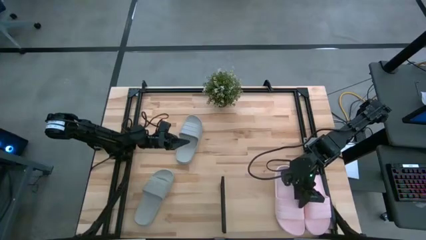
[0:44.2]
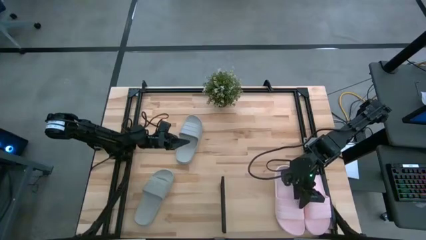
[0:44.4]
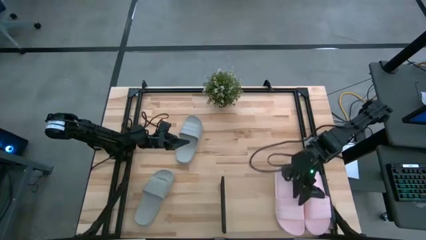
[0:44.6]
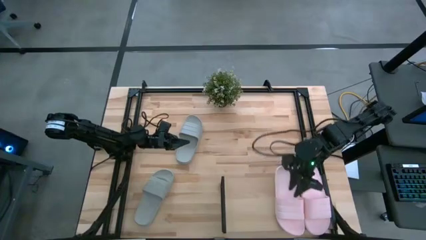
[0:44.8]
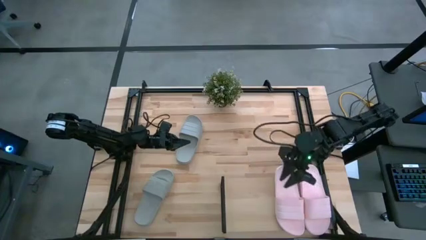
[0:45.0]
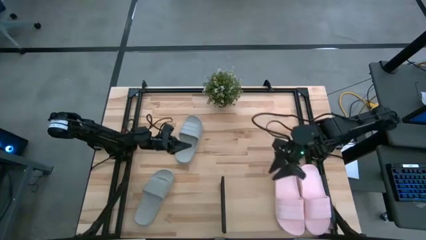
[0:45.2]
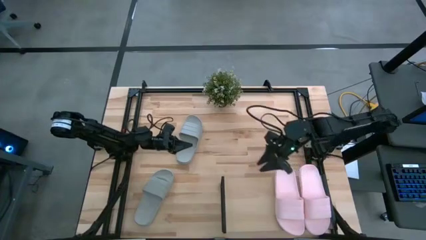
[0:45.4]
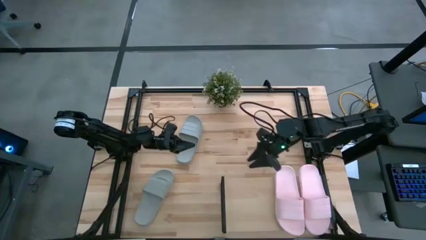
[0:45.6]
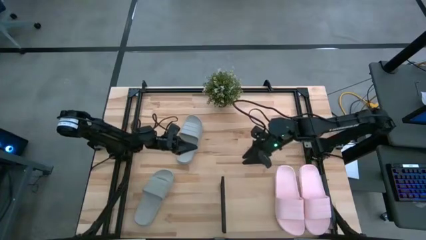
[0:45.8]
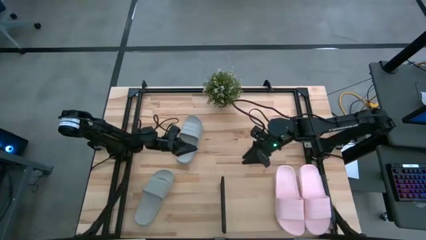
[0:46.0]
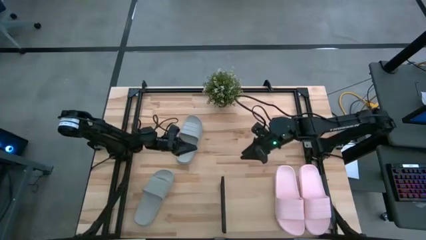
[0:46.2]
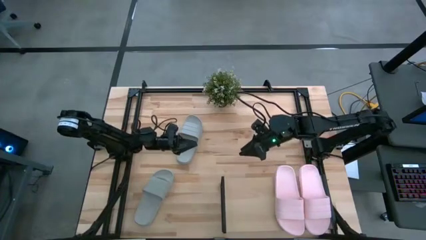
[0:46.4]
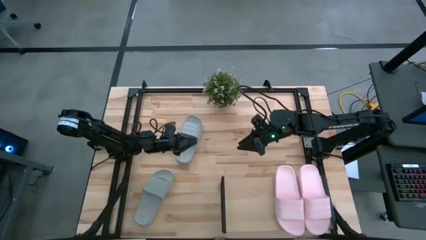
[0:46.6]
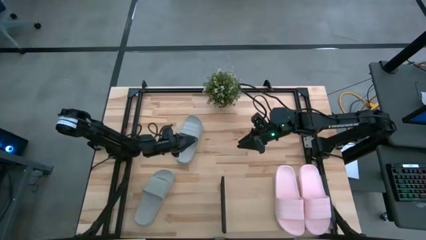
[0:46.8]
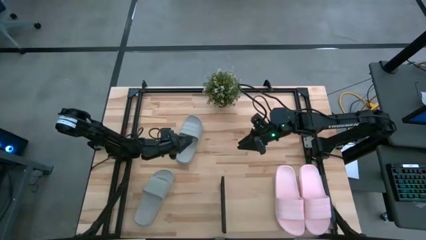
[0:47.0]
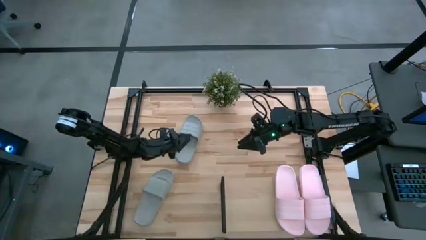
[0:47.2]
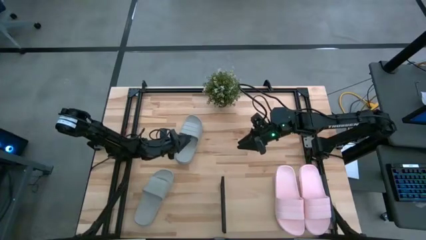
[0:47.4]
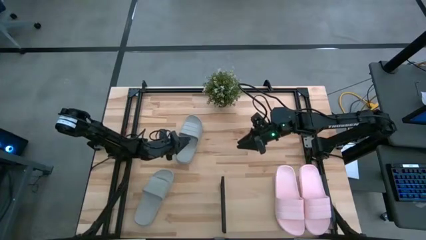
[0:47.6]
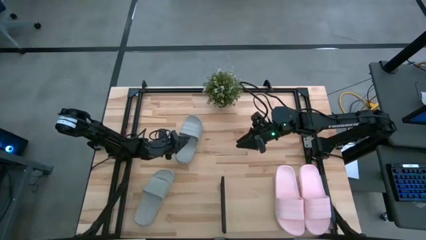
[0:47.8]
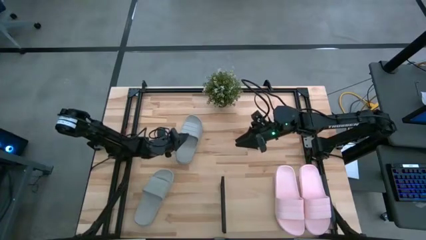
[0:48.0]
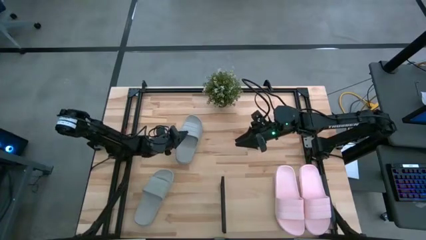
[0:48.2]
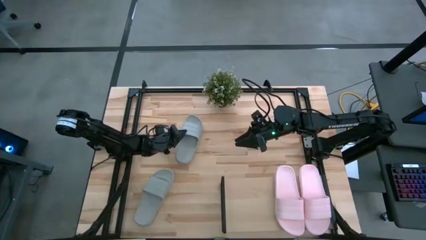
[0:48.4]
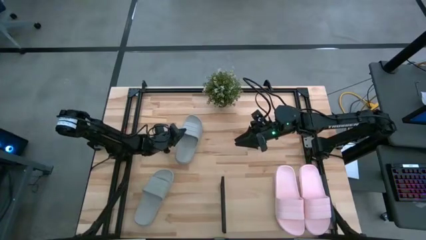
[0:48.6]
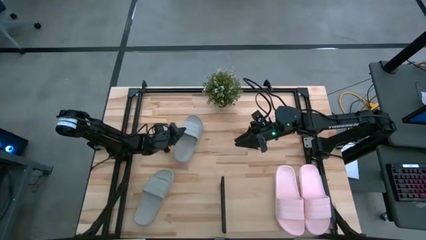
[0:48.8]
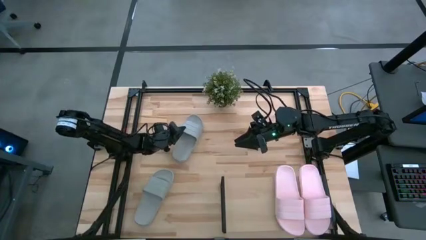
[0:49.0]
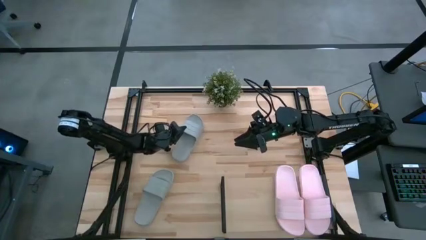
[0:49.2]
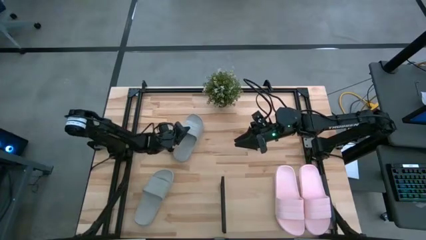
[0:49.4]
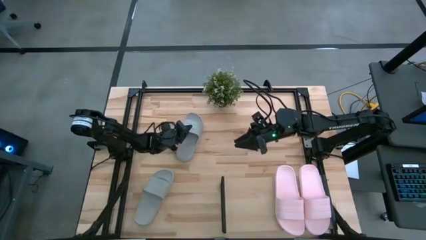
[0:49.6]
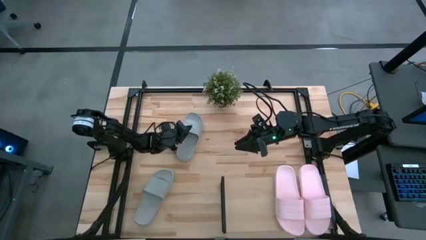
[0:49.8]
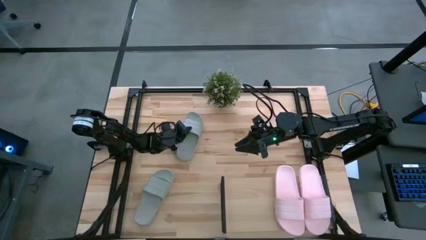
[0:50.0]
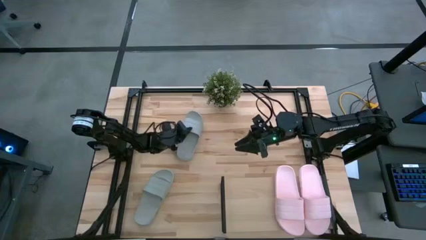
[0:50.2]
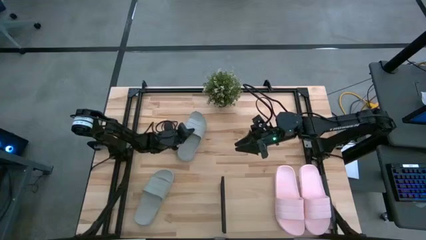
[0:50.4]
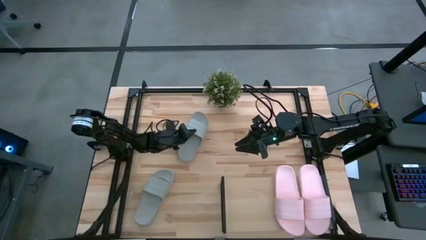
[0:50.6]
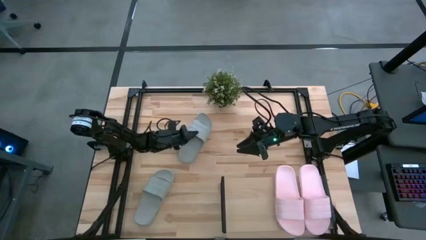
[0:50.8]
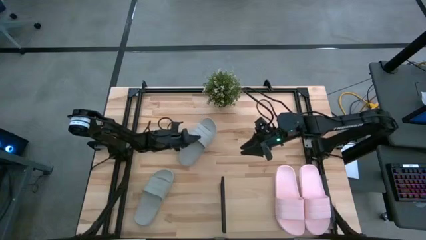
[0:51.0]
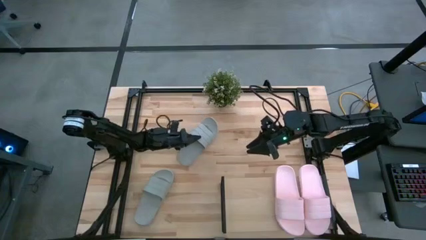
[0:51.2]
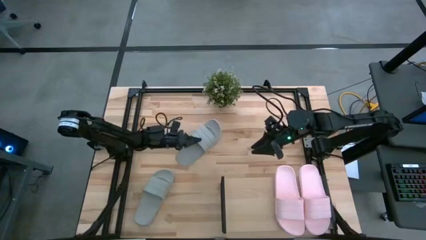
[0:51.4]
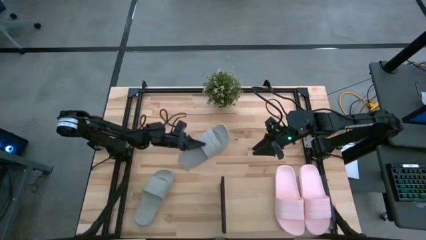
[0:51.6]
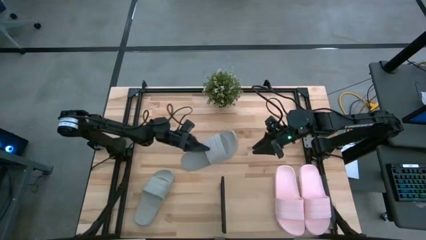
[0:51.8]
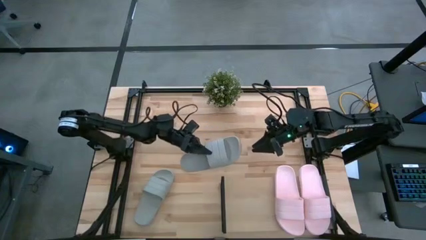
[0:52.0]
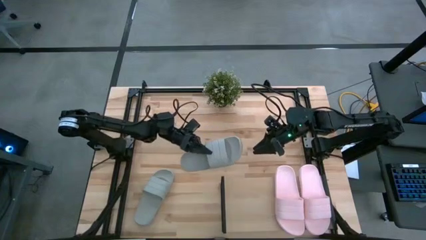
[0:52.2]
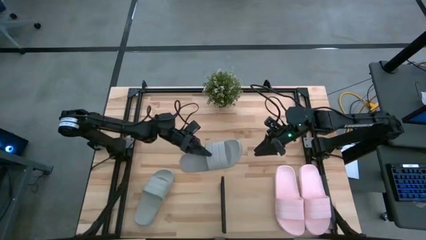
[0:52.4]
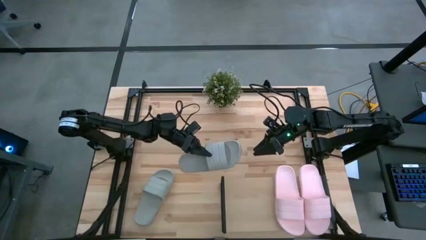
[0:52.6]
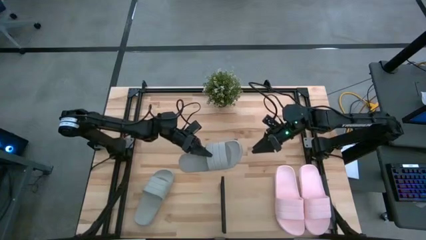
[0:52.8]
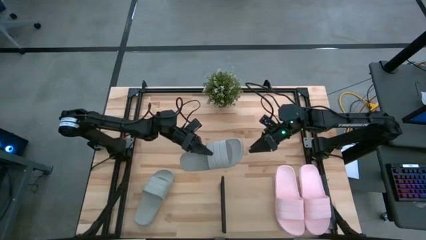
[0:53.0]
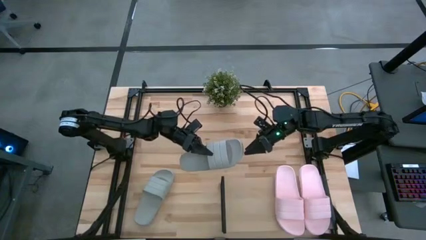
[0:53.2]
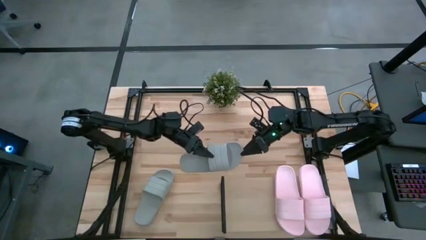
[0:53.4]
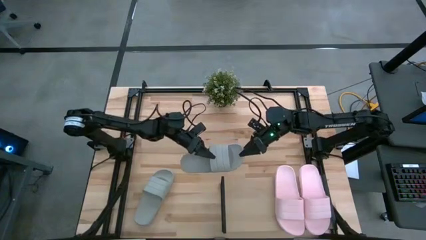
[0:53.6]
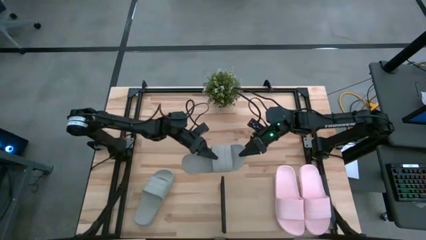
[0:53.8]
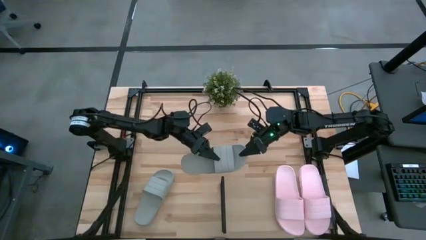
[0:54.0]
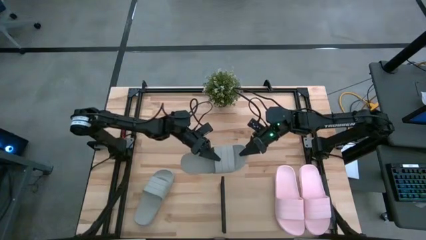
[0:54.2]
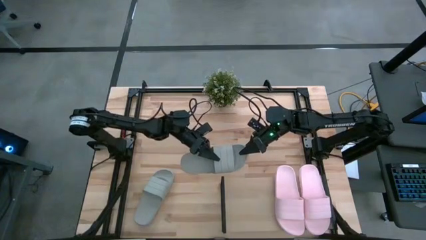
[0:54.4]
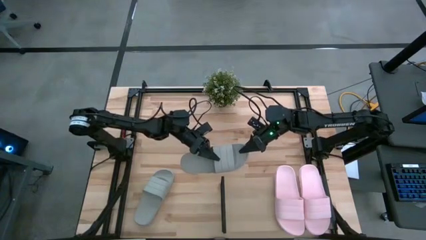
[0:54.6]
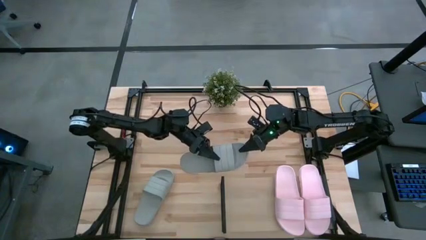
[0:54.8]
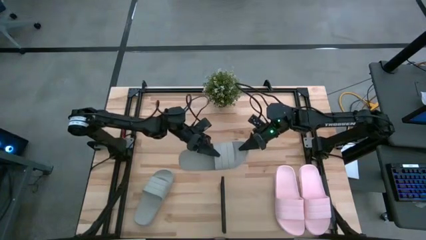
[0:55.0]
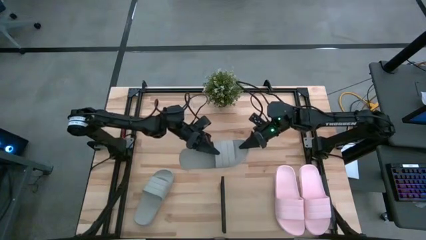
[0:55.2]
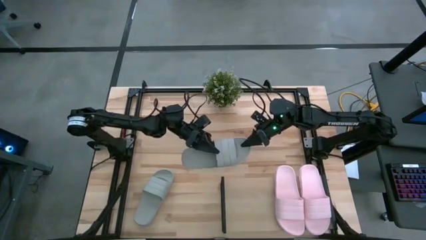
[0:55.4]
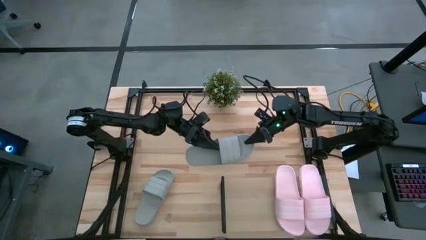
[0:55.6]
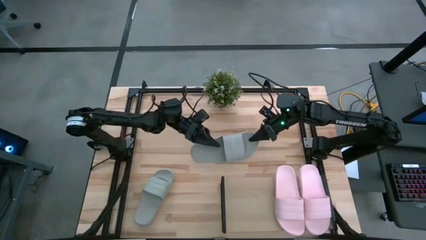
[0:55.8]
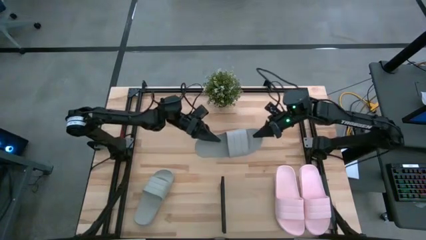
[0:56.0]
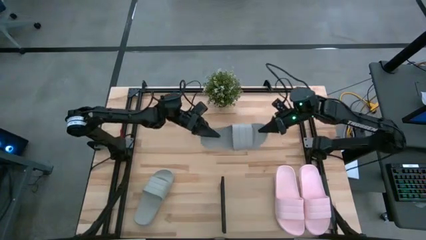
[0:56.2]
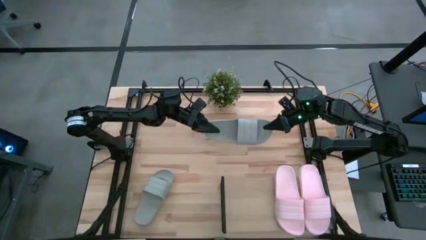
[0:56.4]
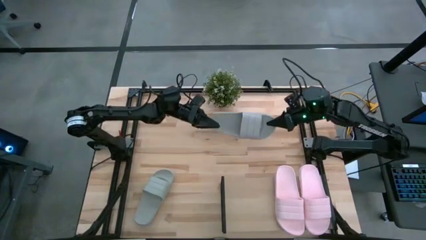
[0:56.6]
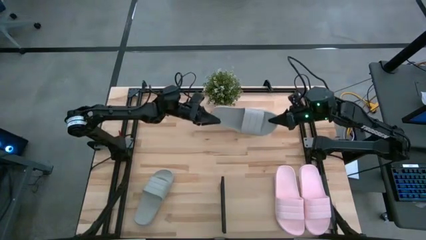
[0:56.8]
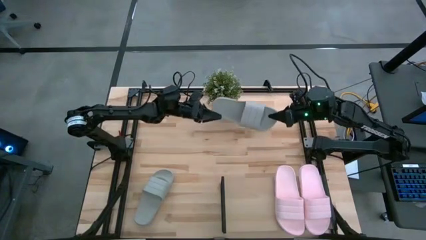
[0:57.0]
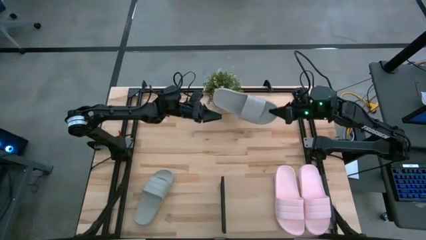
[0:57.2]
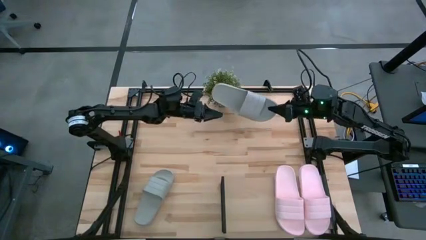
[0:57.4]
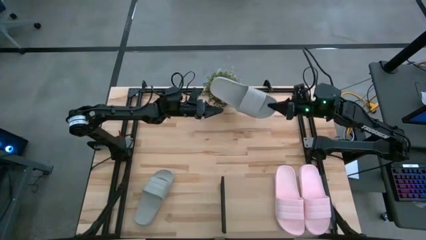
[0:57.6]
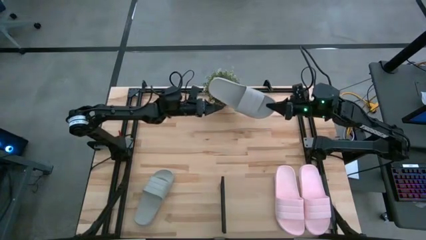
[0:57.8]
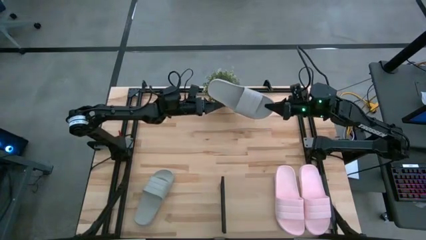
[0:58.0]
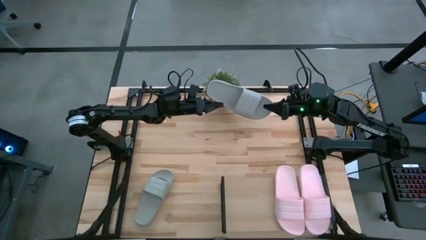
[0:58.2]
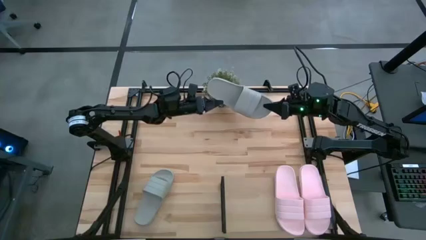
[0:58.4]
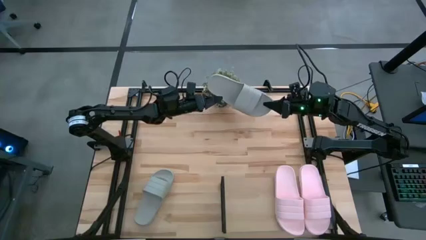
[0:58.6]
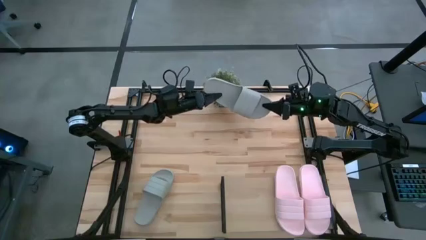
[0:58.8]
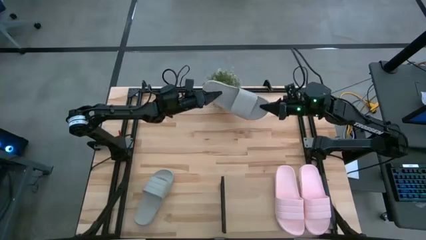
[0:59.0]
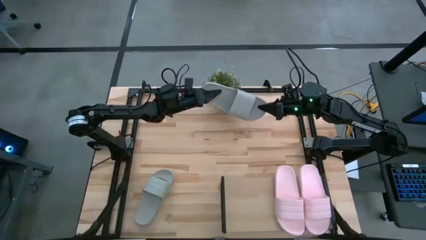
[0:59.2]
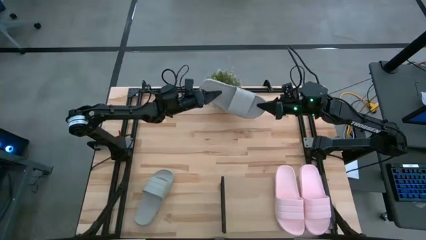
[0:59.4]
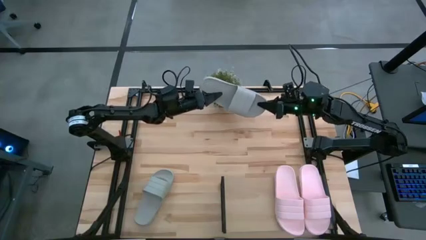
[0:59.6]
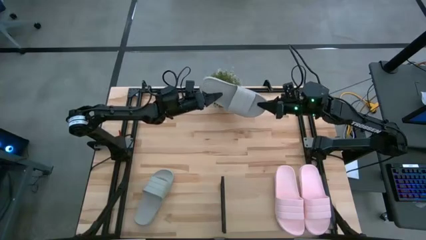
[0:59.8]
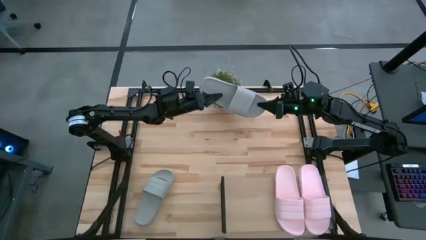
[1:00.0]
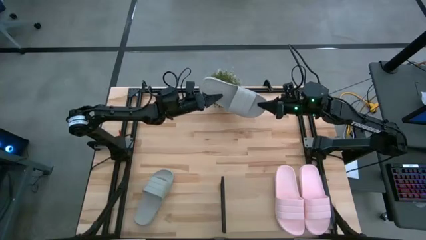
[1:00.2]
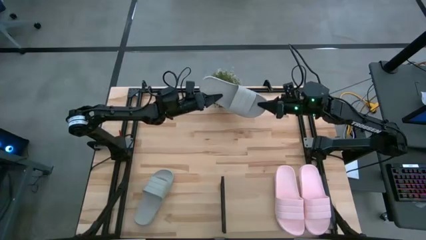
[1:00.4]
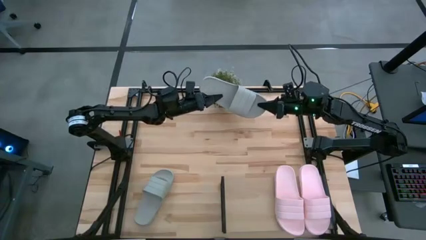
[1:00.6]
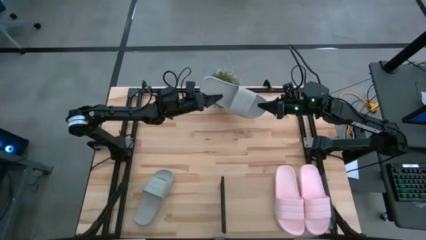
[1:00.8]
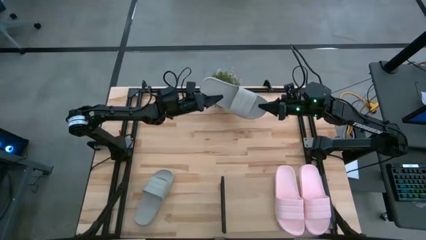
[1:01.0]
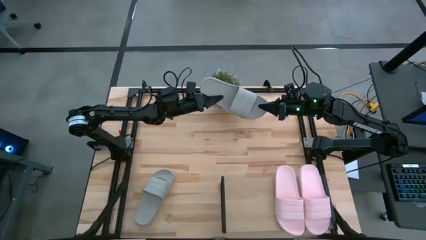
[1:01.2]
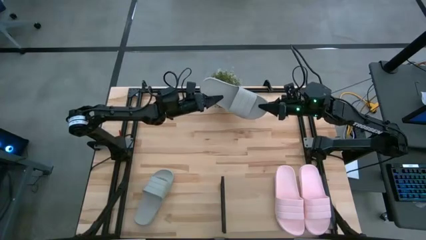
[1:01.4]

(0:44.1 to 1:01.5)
Task: Pick and place slides into the shelf
Put the top gray slide on the shelf
